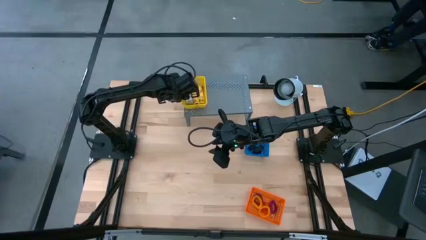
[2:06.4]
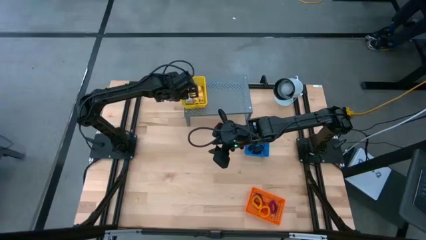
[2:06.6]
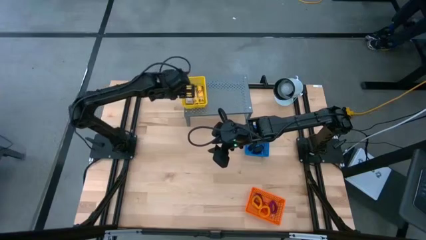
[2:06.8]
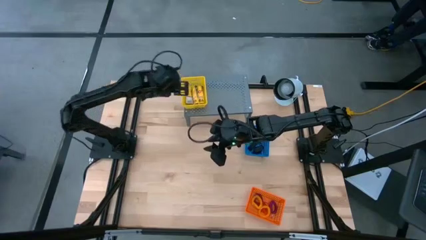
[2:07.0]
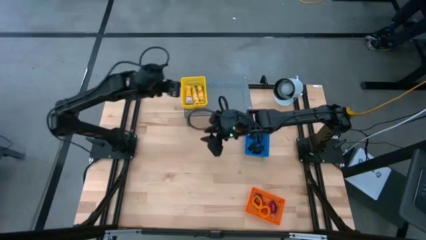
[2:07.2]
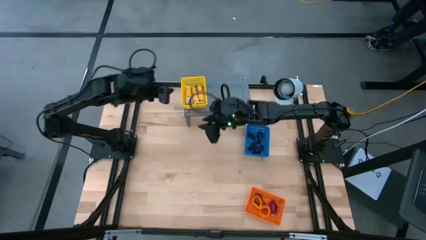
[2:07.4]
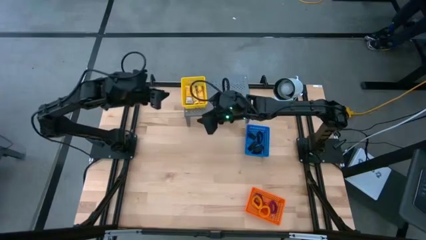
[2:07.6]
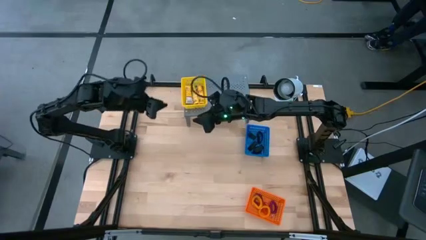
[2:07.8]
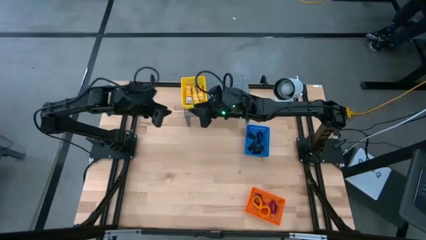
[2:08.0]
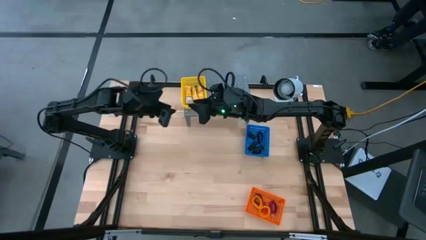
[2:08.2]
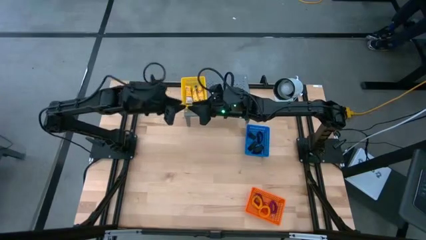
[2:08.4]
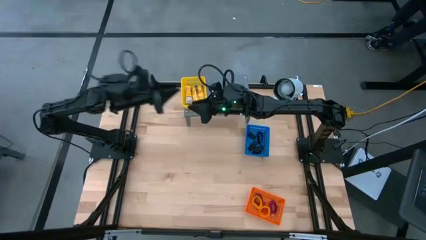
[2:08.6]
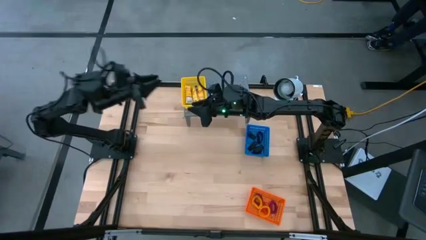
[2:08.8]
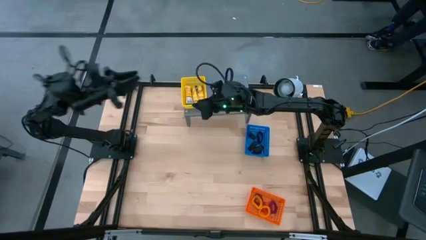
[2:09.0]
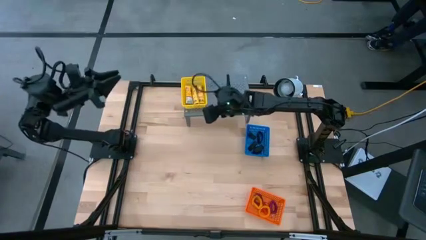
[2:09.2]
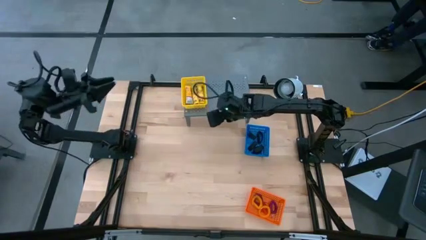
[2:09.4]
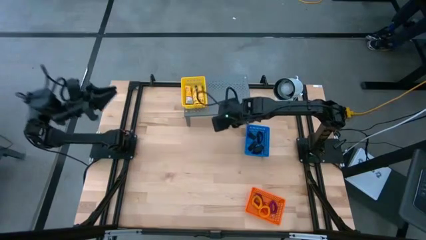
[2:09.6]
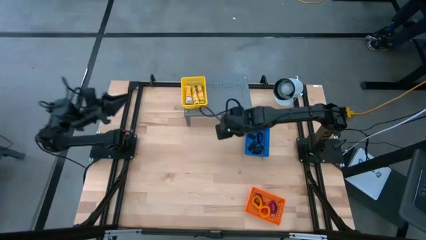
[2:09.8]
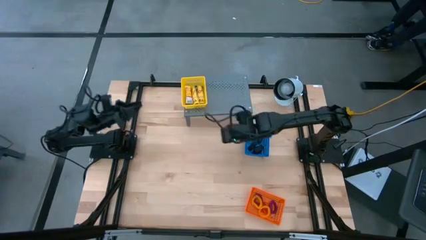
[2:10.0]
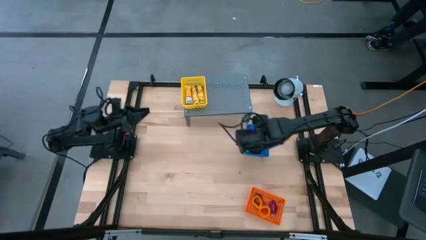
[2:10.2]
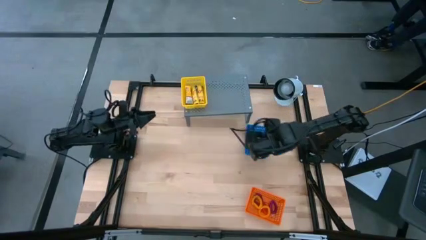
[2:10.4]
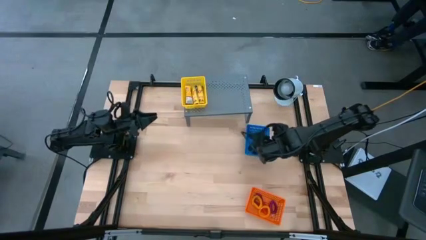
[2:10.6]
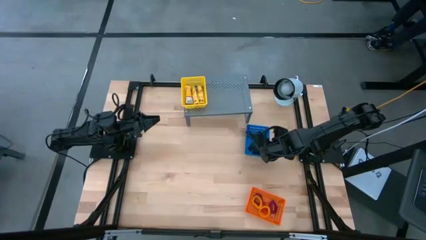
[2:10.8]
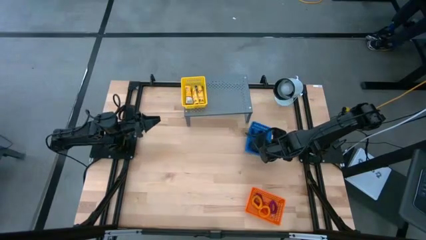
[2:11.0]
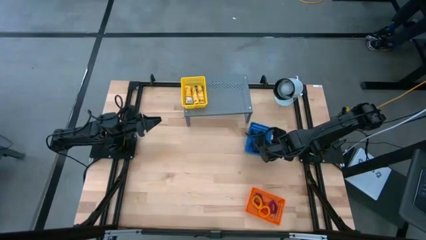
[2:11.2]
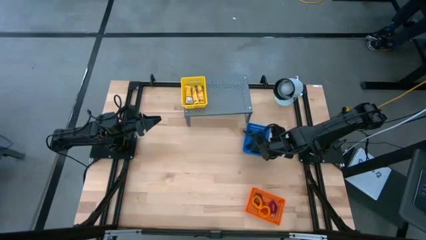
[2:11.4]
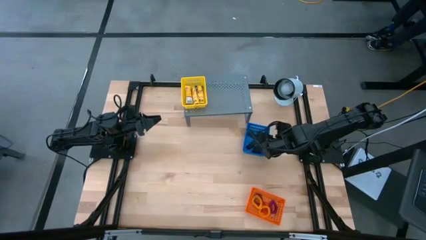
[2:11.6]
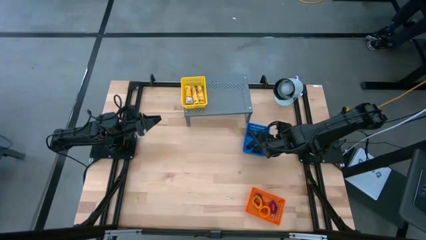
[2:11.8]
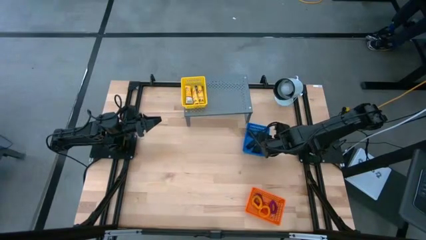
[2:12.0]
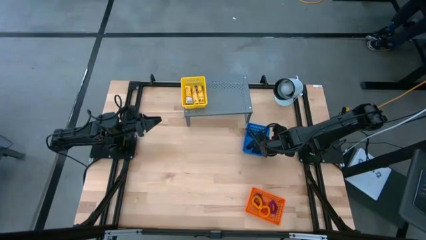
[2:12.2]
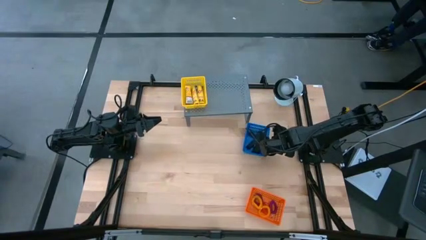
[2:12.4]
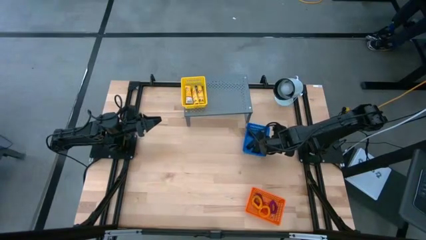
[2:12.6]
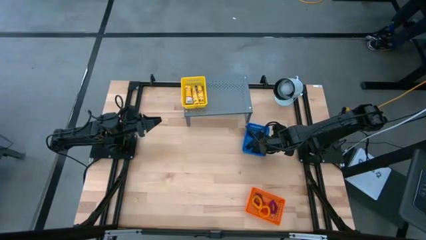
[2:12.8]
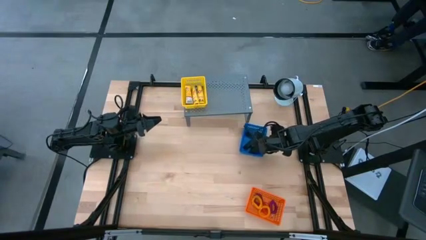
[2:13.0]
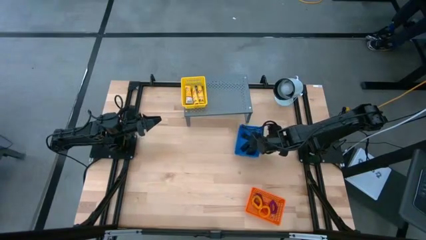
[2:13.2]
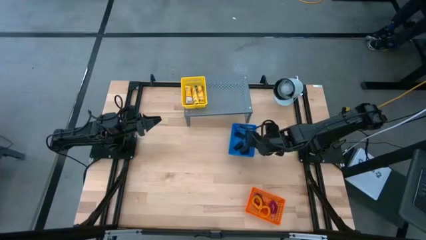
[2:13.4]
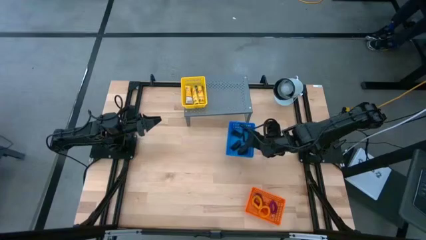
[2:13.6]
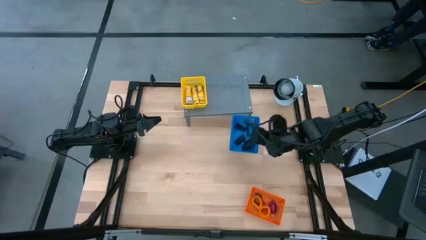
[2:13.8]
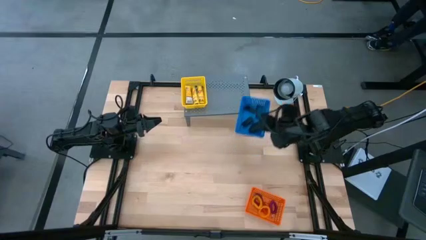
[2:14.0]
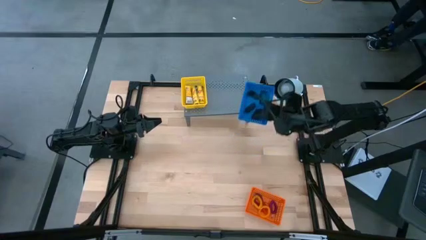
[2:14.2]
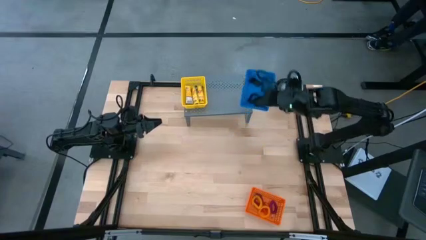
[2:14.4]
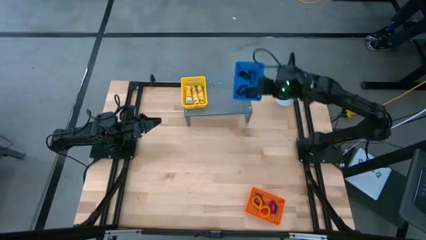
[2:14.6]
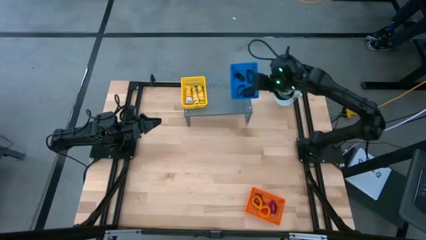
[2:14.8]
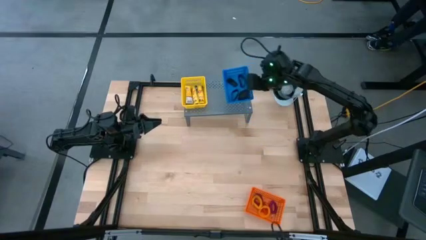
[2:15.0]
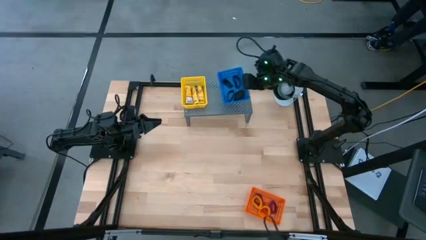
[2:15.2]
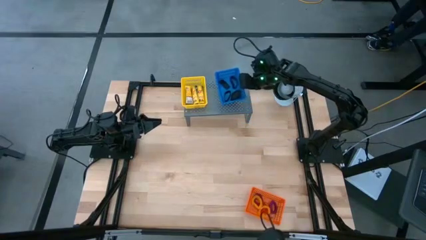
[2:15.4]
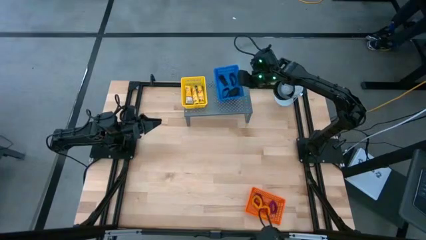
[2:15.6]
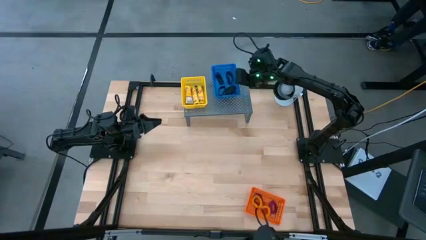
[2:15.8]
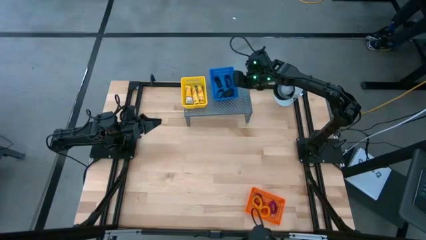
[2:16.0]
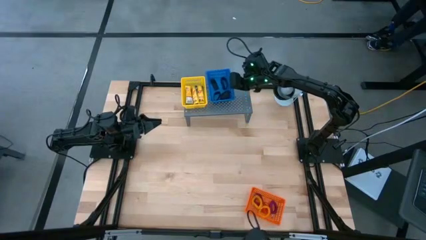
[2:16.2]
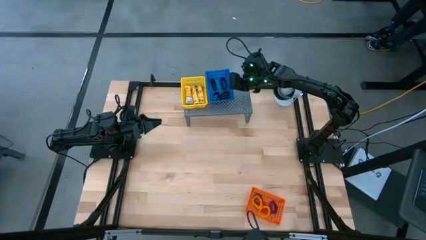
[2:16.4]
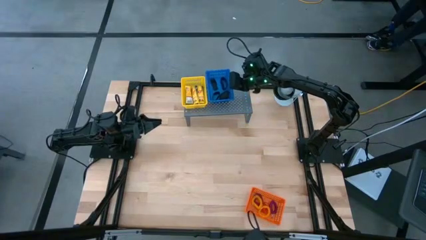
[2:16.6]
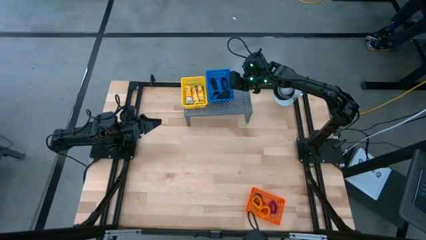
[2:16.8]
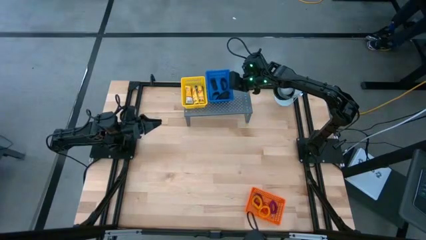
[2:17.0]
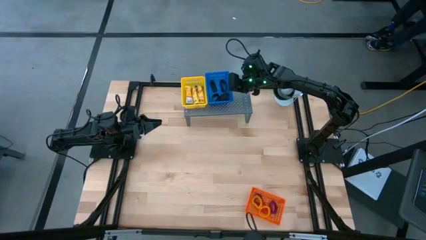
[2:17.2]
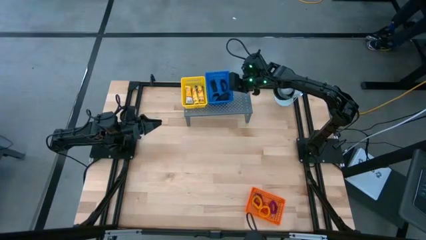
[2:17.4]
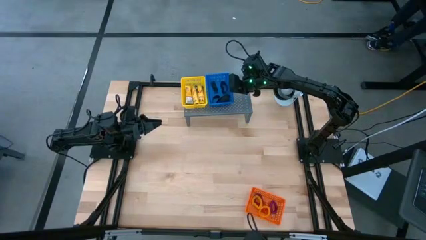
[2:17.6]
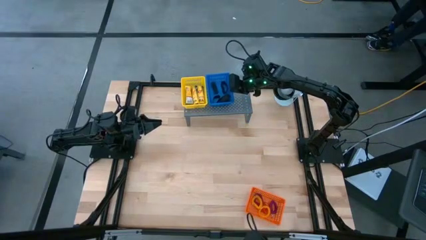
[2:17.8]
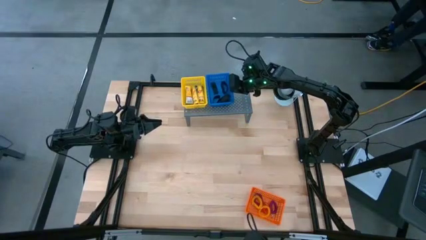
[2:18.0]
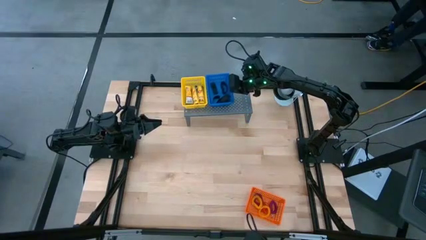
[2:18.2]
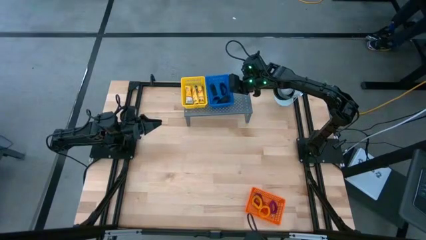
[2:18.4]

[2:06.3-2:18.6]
Task: Pick & Place Office Desk Supplies
Put the blue bin with the rubber bands on the shelf
